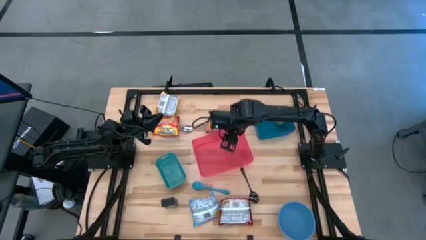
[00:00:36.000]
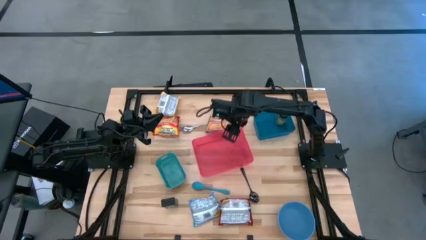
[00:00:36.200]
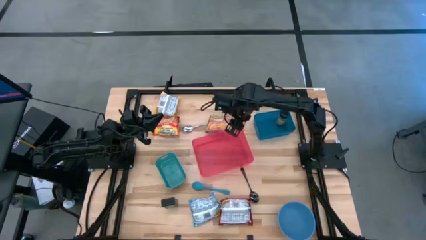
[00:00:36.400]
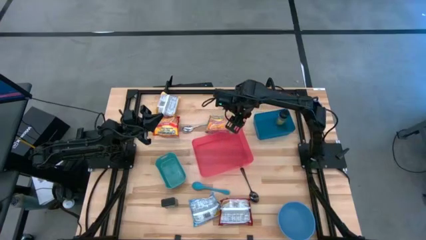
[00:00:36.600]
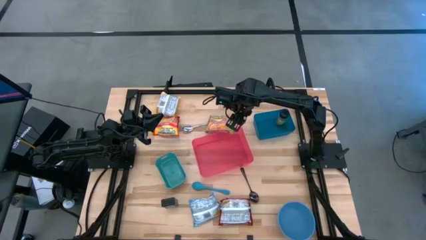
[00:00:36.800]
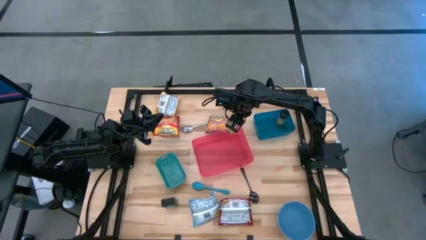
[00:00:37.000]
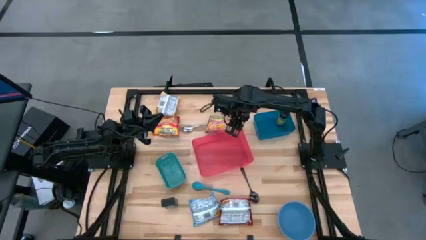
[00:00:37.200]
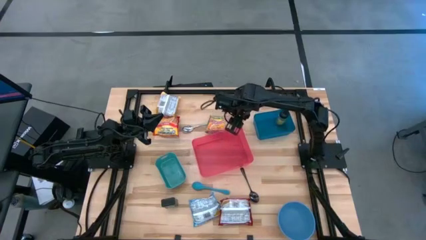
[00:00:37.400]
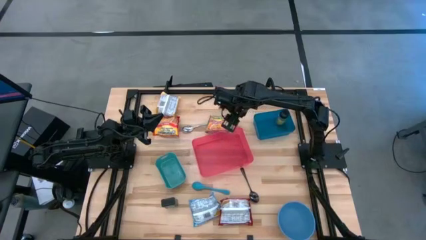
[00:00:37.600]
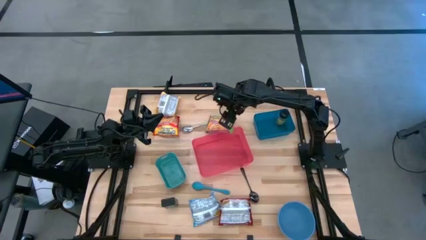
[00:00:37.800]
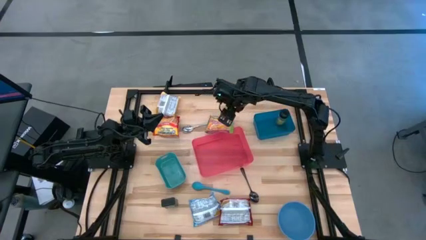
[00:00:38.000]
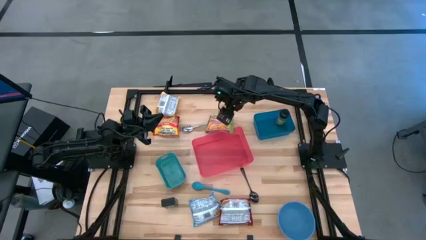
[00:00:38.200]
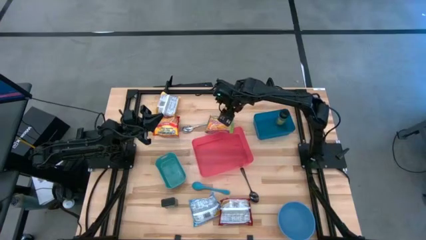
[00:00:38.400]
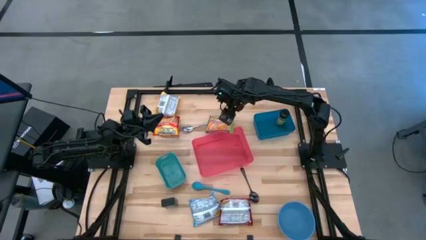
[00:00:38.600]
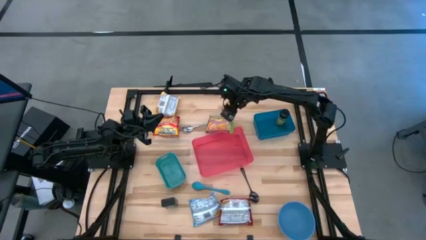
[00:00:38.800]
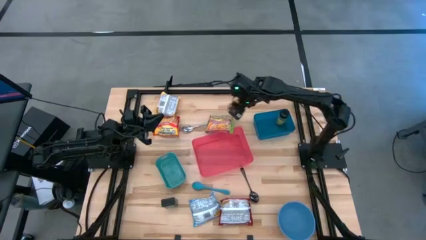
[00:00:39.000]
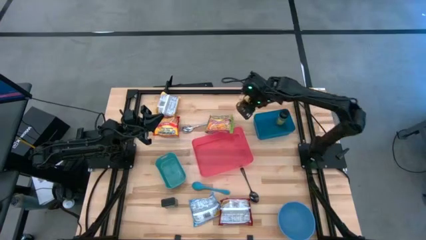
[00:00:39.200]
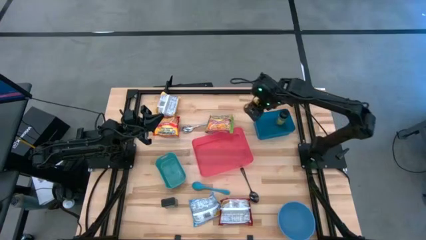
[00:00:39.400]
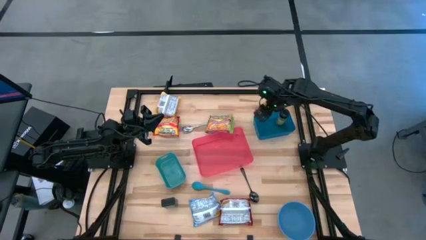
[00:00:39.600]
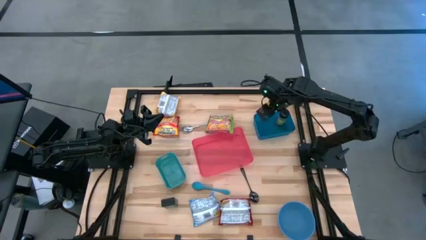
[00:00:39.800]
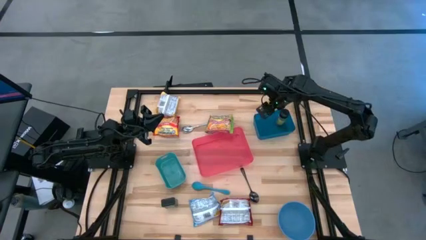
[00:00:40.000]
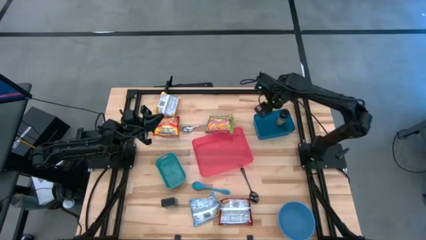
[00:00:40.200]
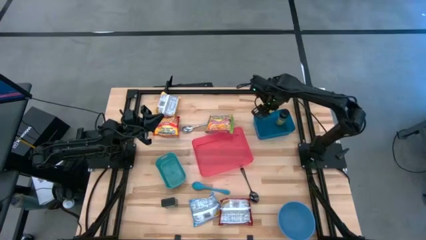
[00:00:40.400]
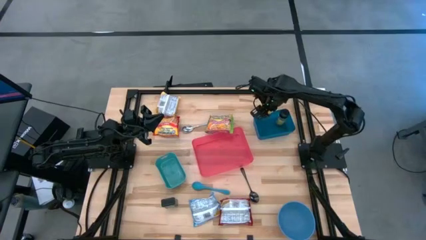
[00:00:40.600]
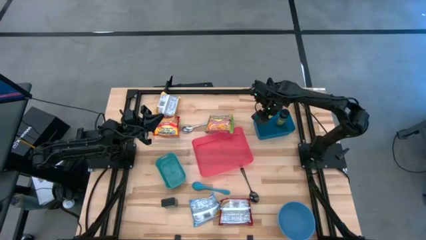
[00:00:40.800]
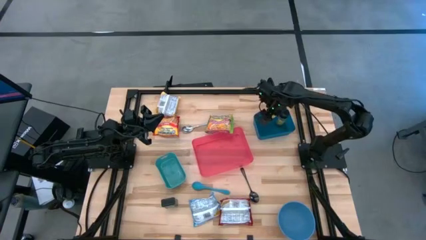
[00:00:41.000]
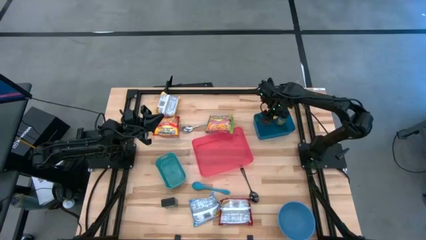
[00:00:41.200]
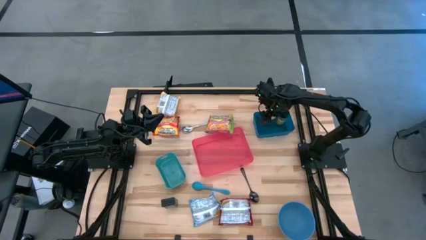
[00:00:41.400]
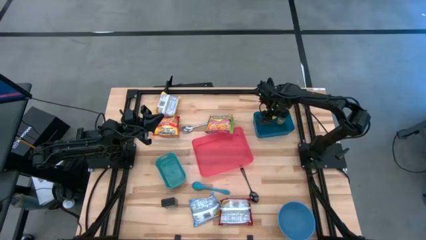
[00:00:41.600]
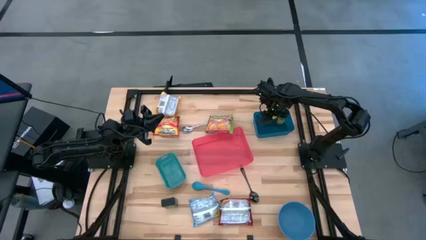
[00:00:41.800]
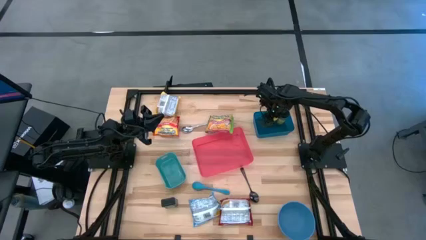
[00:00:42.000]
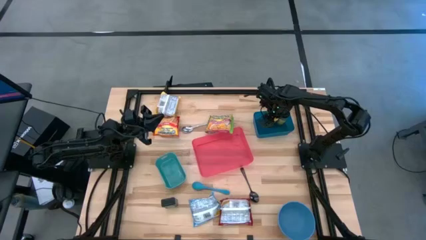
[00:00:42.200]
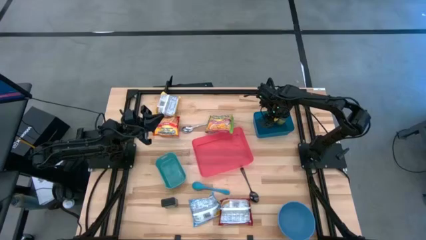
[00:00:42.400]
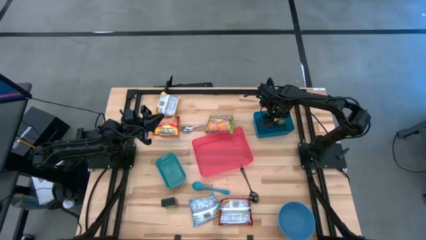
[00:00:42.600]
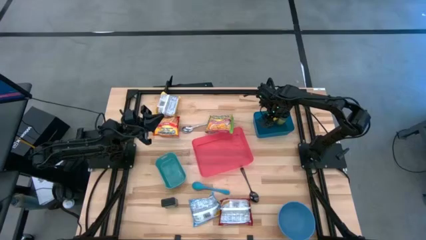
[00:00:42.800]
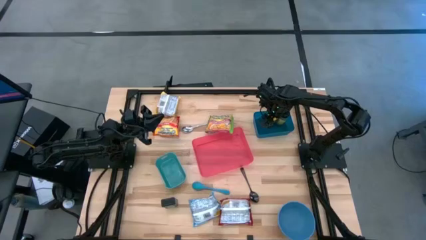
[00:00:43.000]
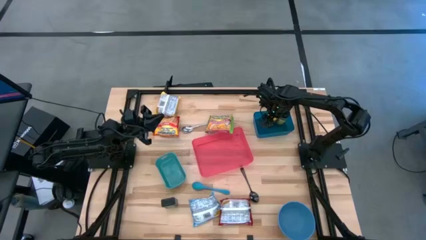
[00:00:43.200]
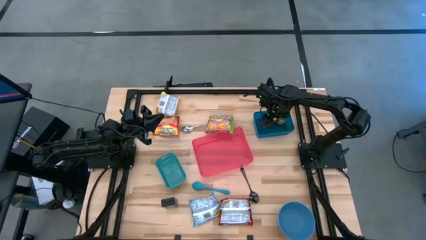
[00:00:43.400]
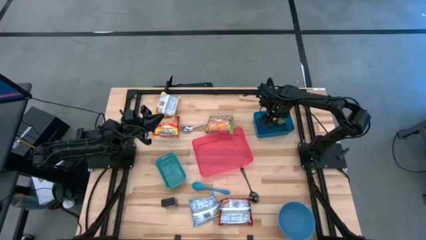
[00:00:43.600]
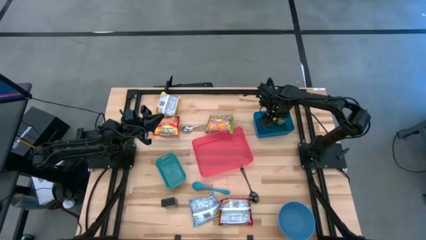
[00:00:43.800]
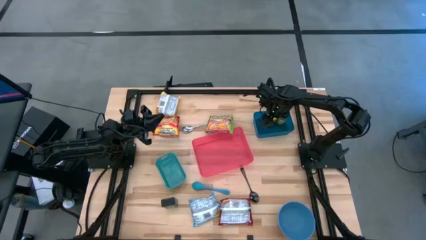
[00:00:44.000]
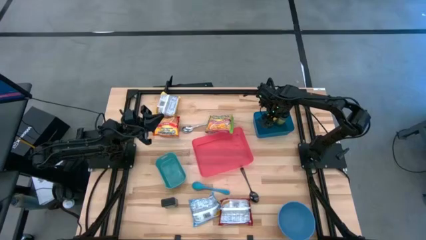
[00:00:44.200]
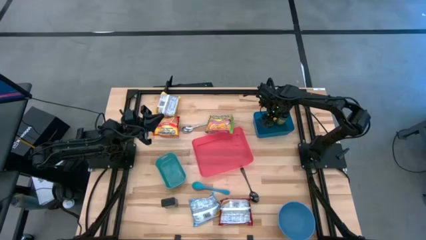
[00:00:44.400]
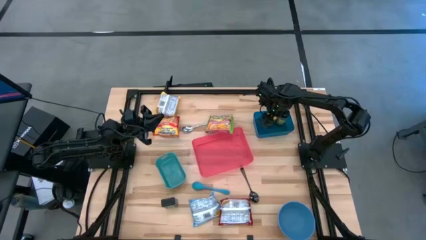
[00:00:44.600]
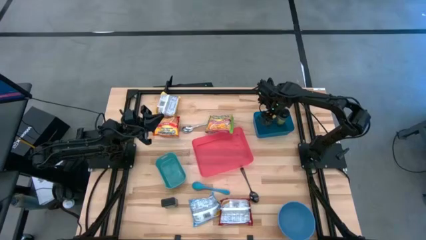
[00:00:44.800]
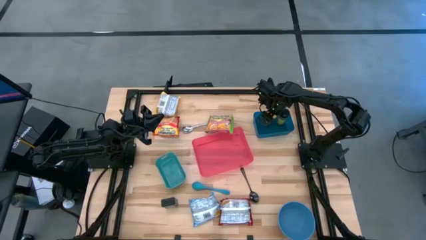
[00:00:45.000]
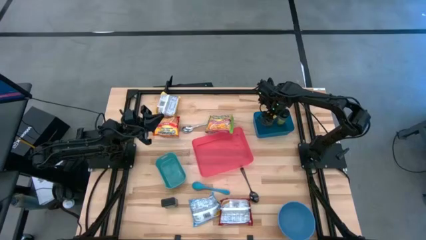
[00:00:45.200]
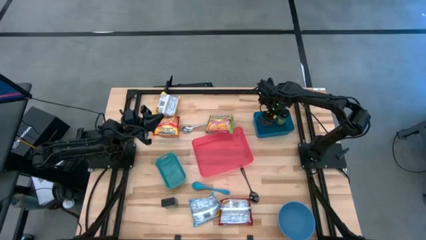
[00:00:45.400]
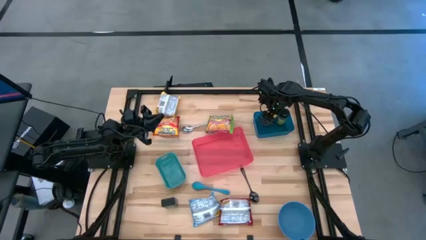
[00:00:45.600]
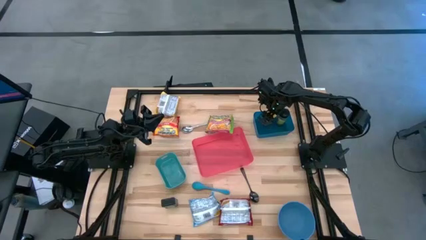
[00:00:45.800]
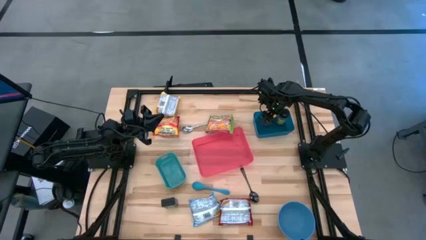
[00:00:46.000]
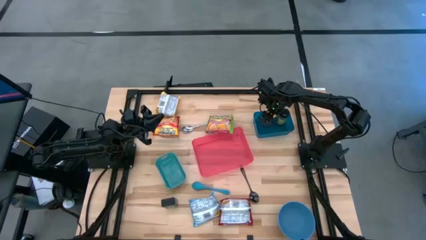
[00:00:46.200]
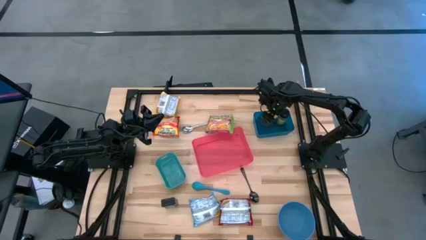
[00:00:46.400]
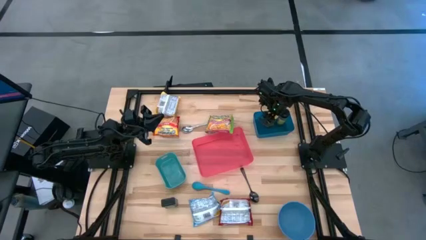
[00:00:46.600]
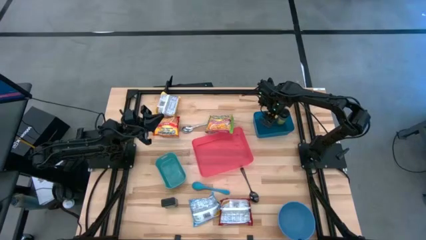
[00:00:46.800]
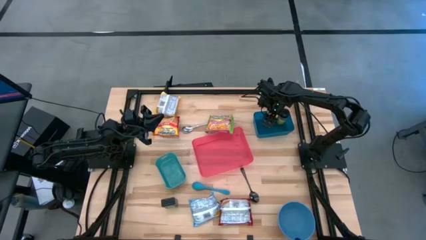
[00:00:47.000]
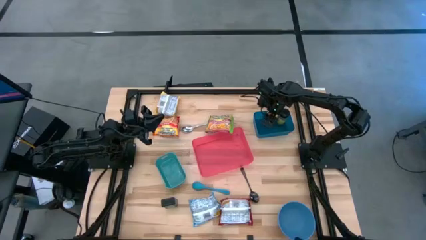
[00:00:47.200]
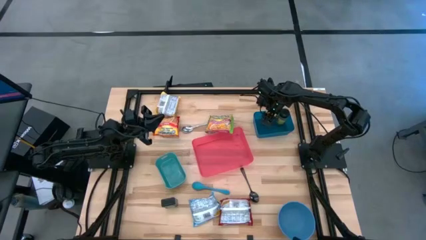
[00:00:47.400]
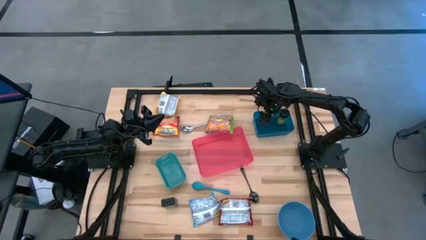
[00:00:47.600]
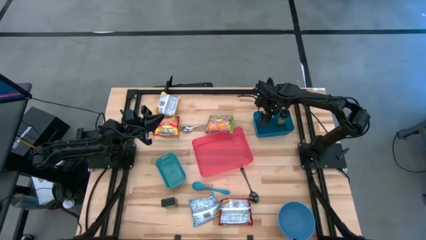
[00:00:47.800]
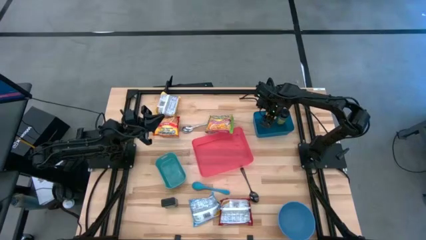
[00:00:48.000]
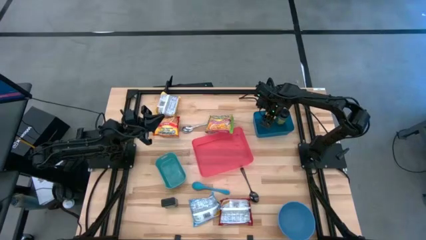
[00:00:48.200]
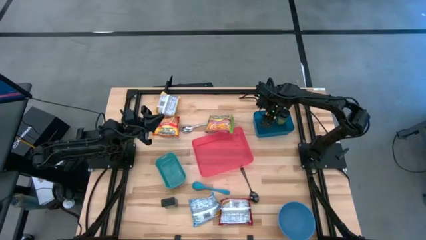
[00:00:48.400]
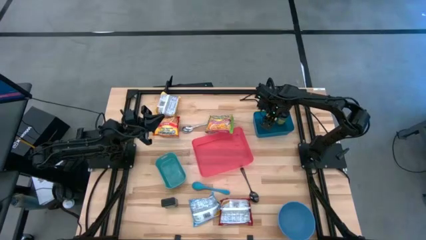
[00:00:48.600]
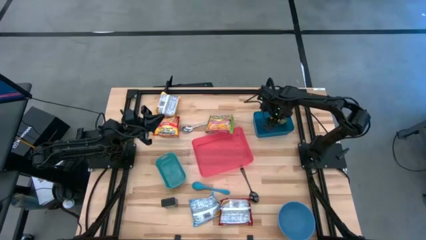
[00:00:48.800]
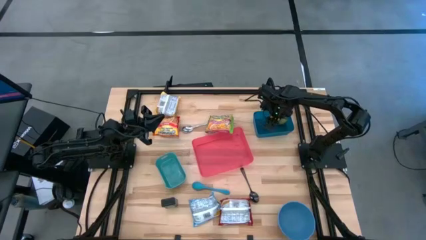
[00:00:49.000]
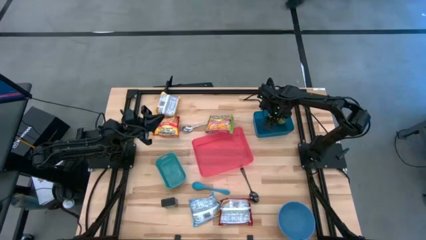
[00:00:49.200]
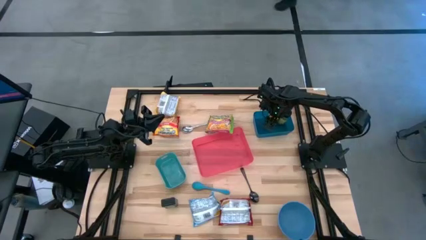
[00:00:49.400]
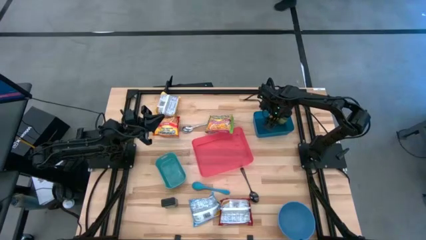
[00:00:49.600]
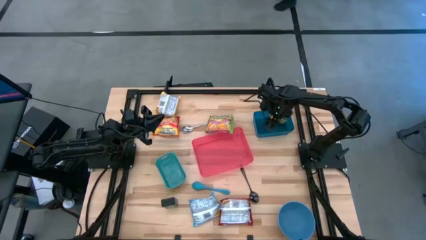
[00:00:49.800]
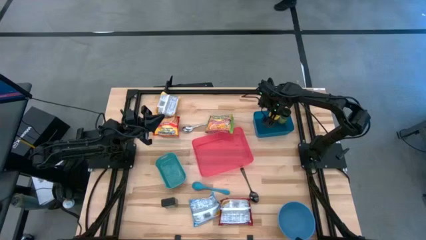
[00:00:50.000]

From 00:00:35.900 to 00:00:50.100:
Task: Pick & Place Food Item
Put the yellow seasoning bottle into the blue bin
